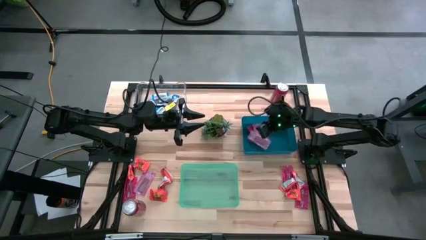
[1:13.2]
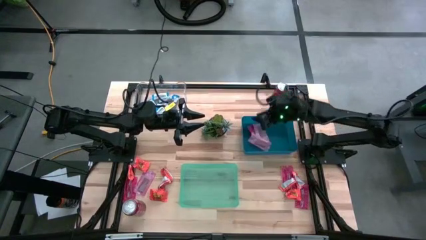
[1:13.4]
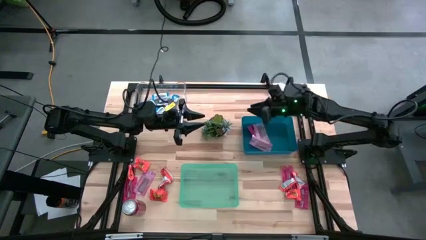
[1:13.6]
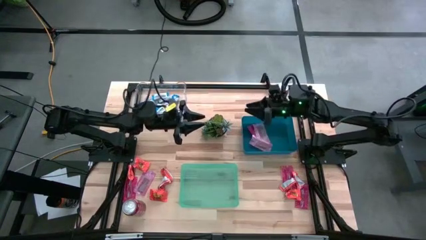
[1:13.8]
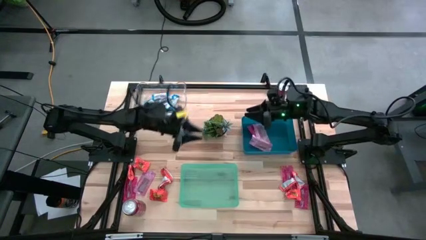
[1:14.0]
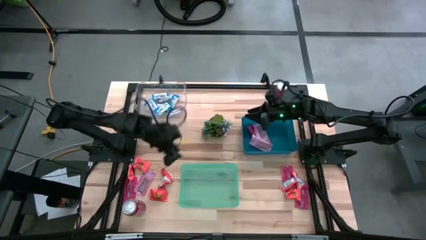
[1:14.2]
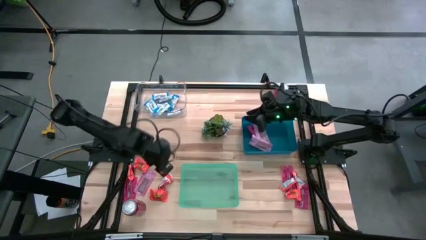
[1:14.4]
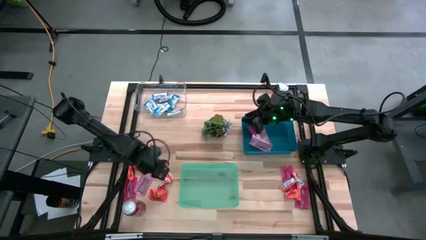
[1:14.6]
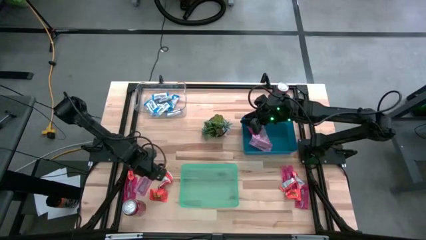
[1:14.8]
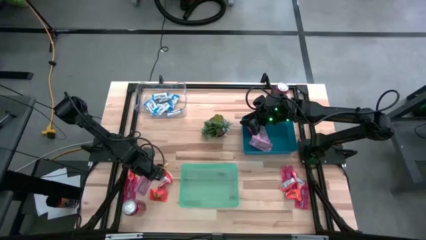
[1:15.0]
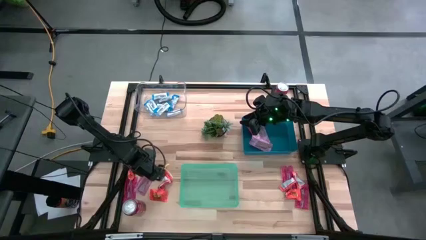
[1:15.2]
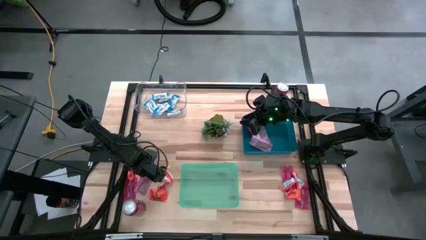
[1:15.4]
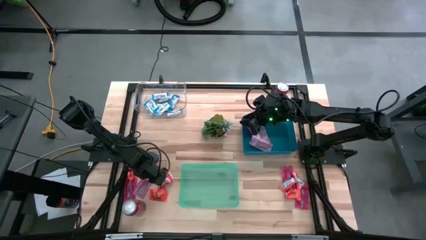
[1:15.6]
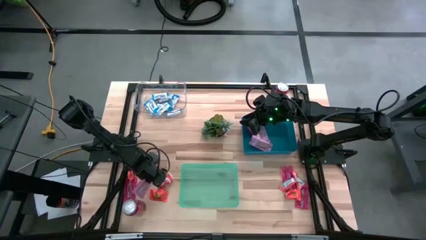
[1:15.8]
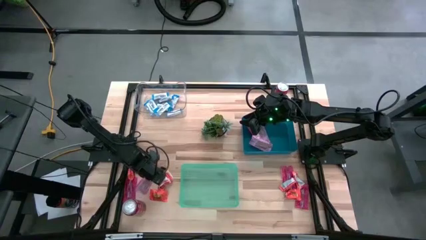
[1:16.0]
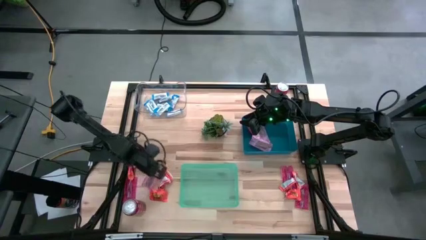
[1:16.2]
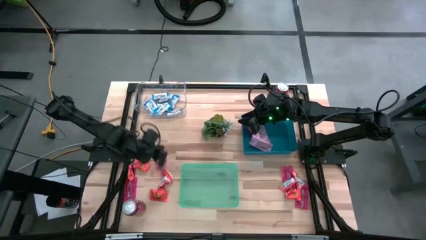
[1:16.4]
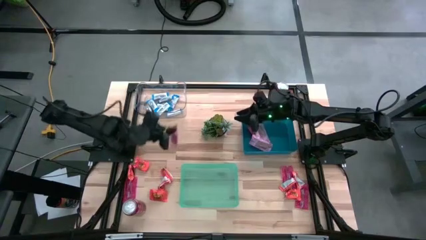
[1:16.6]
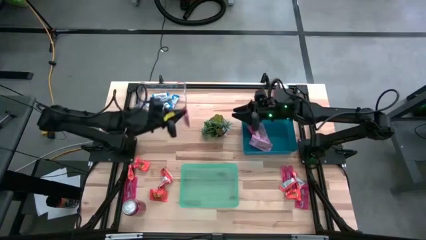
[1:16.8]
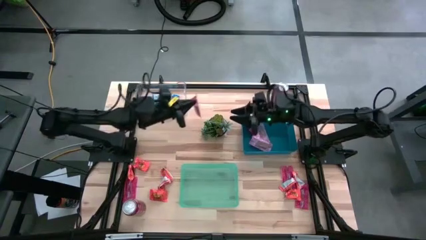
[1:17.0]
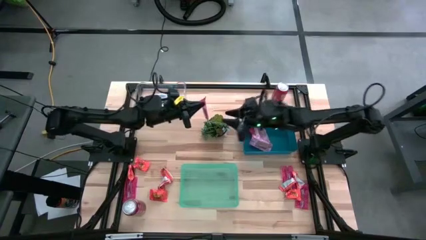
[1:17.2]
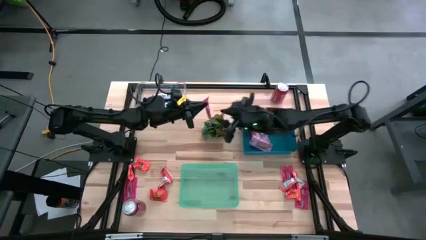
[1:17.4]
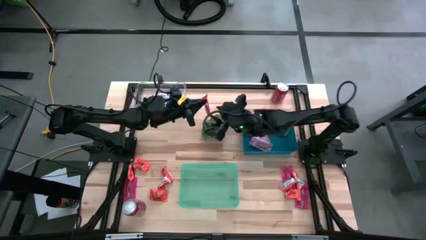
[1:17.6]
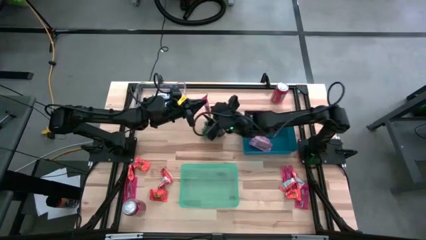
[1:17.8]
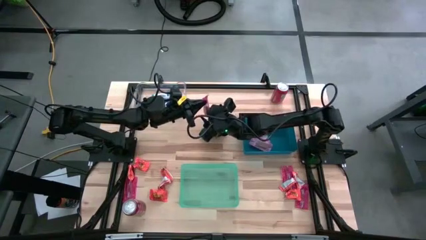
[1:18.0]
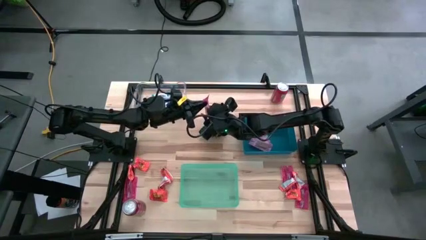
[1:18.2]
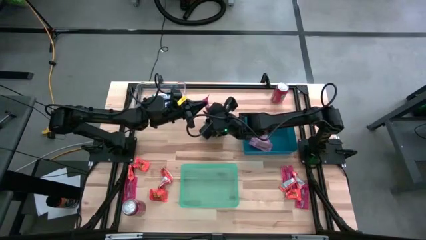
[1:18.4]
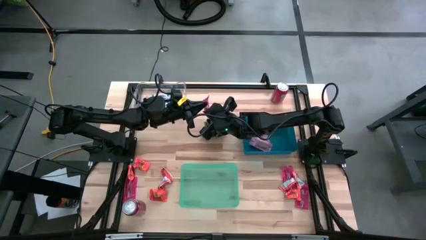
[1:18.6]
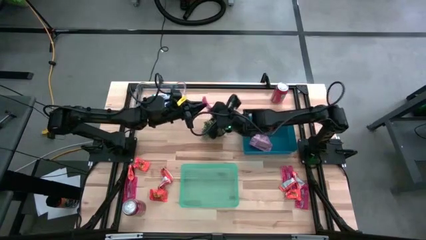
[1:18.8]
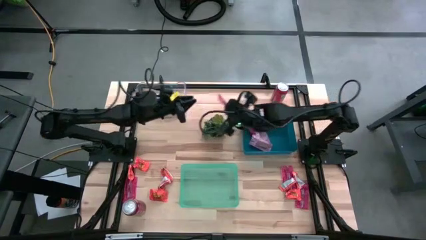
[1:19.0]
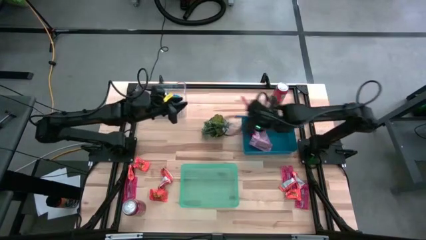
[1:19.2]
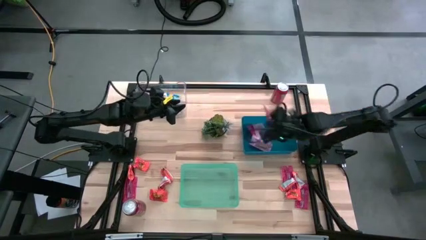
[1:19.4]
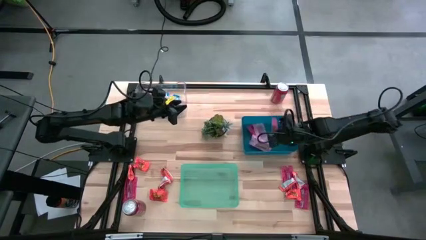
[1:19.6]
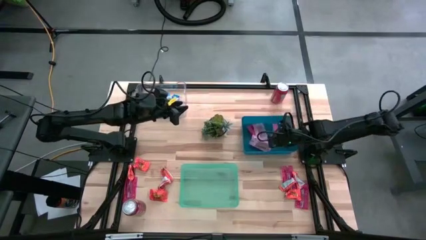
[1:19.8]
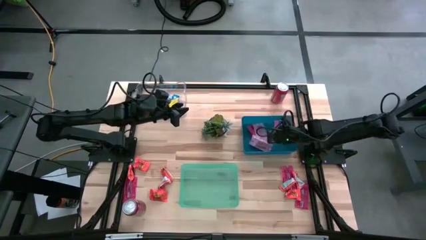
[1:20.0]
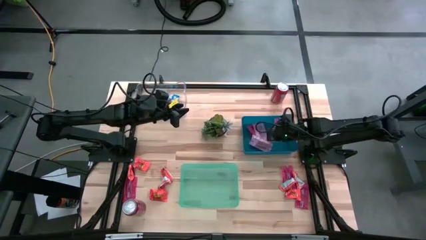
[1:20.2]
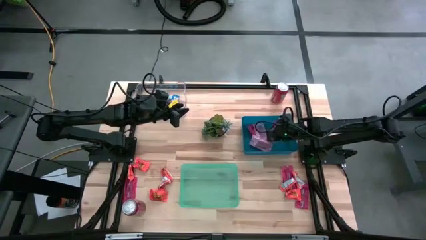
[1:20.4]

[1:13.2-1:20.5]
Task: Sort candy
Put the red candy into the blue bin

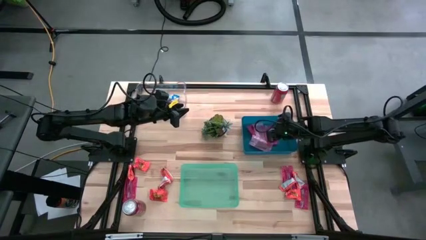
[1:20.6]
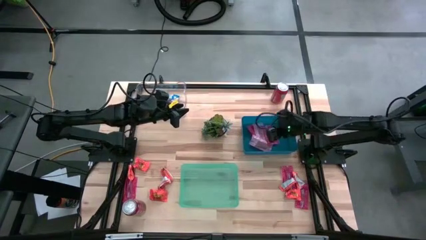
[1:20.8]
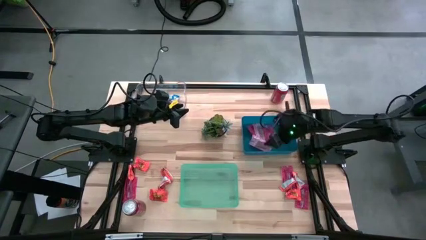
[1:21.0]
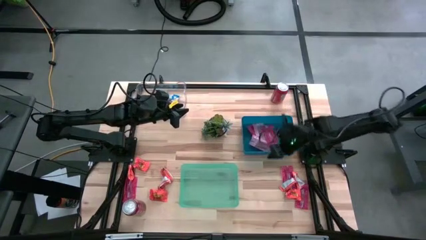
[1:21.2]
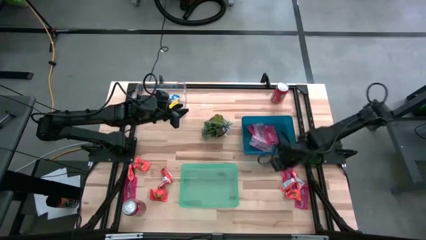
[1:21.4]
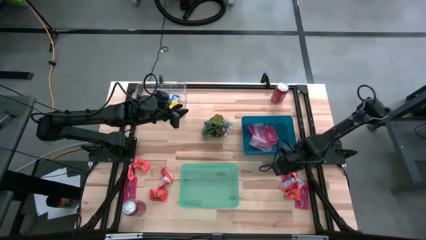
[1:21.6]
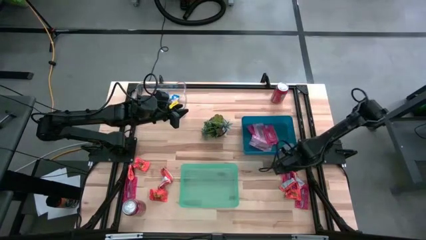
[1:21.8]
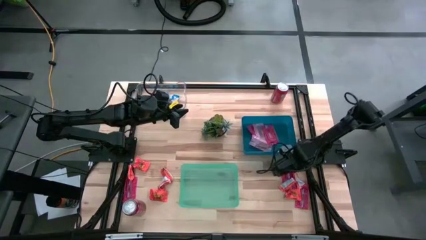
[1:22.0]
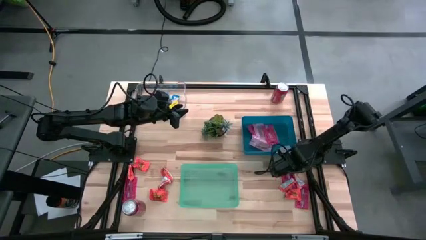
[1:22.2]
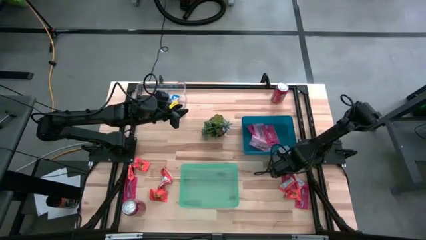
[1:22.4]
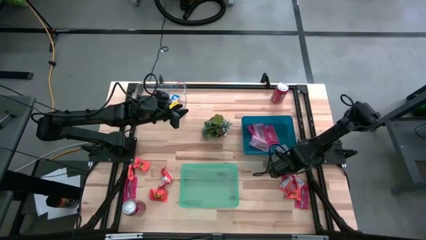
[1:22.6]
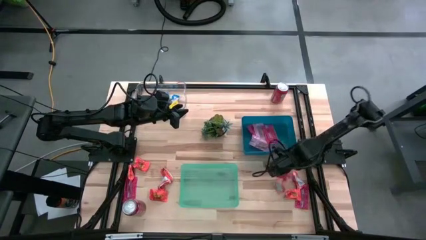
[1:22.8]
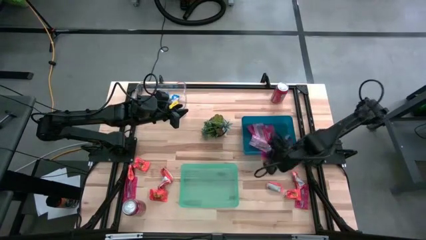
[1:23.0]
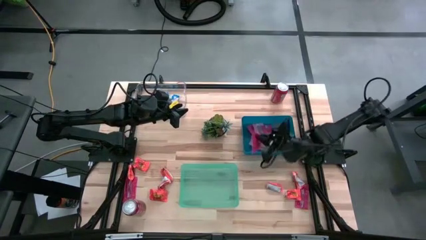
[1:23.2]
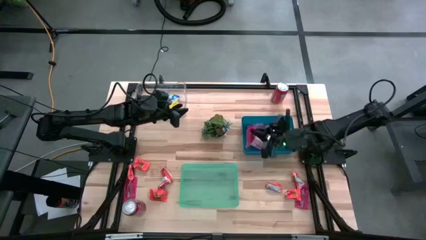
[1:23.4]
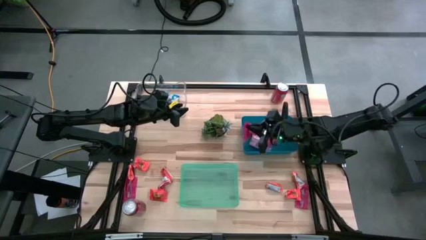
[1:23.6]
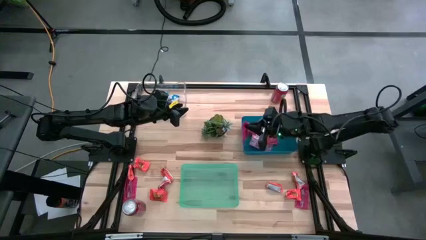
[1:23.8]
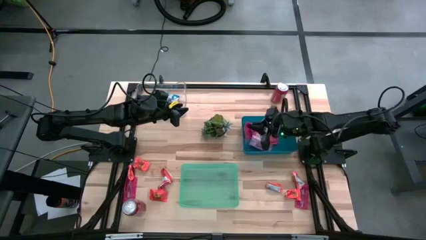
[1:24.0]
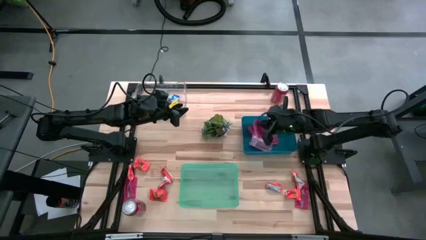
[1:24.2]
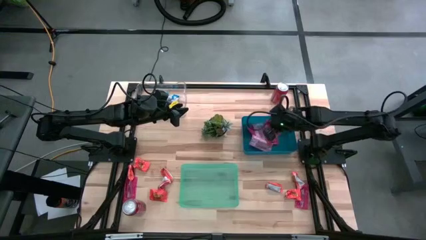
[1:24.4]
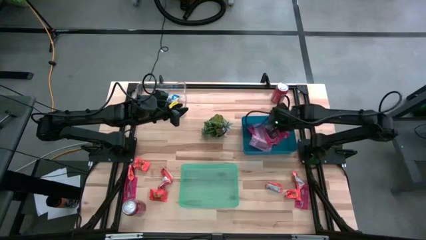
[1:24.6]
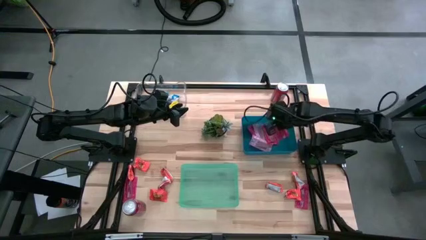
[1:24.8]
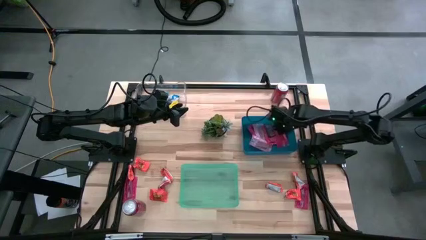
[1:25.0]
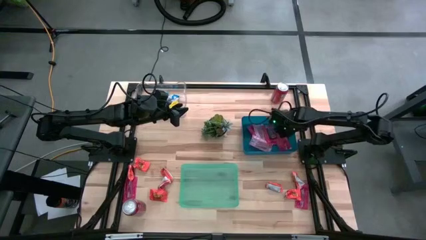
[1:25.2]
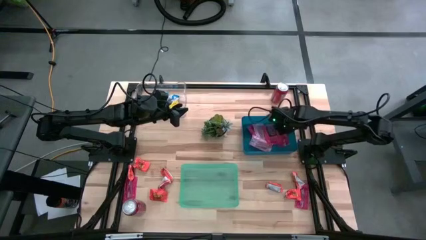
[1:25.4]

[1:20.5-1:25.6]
Put the red candy into the blue bin

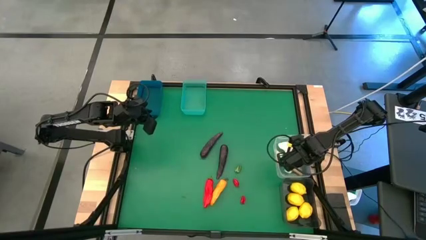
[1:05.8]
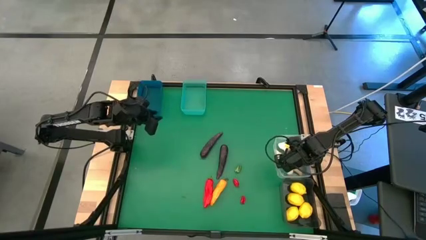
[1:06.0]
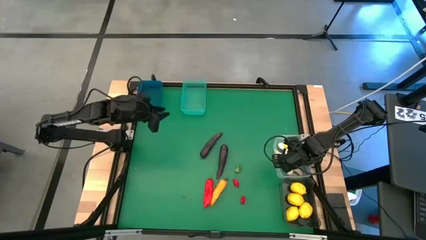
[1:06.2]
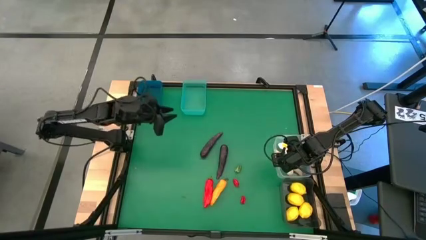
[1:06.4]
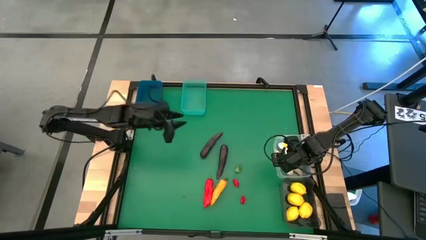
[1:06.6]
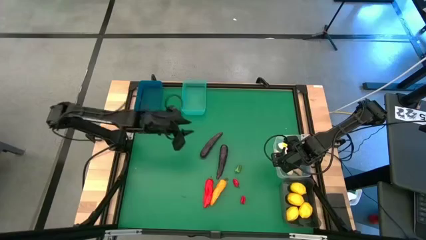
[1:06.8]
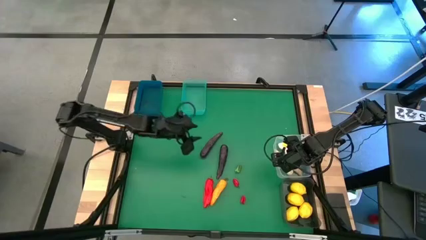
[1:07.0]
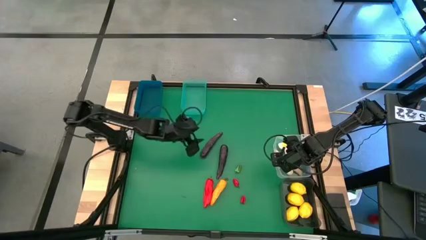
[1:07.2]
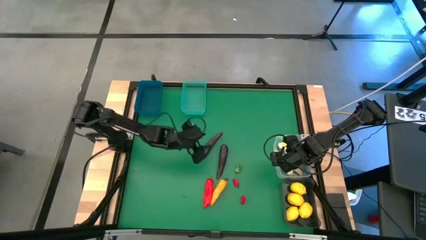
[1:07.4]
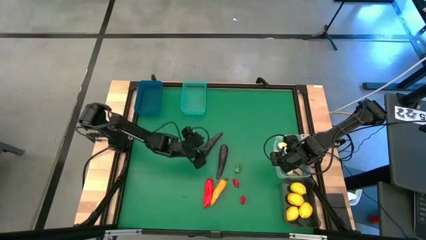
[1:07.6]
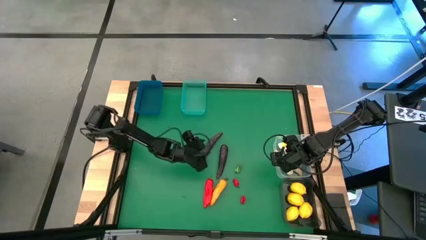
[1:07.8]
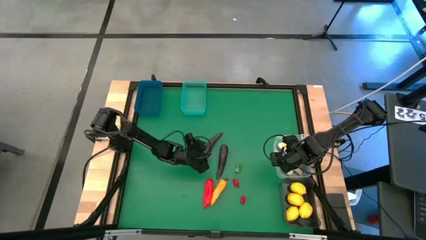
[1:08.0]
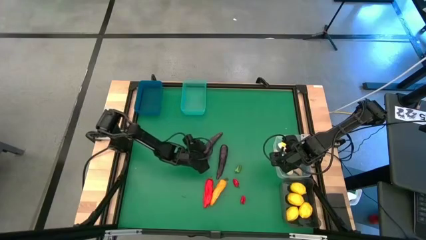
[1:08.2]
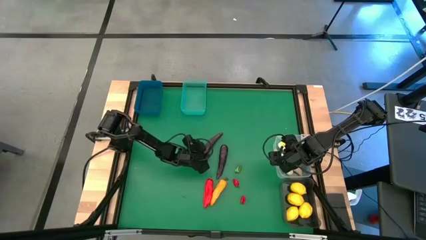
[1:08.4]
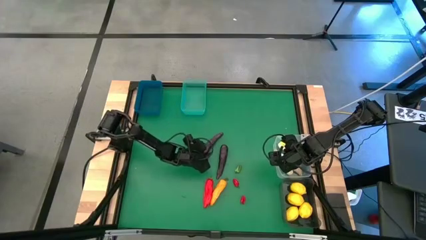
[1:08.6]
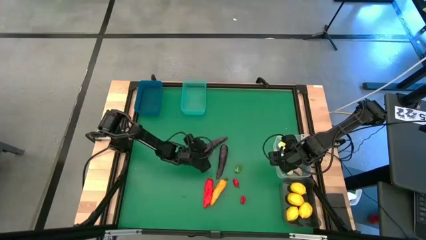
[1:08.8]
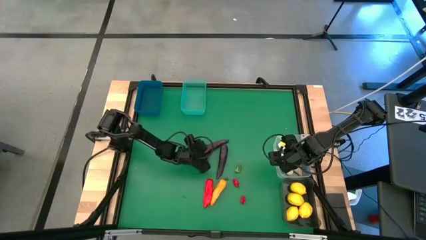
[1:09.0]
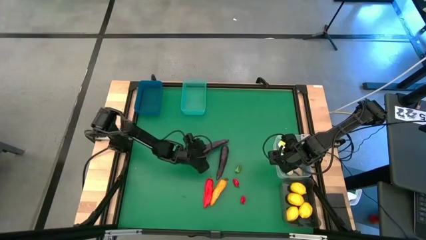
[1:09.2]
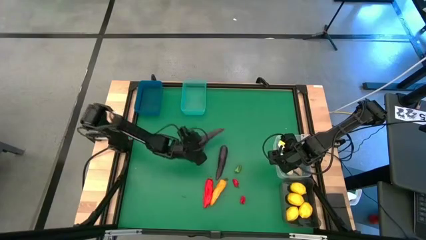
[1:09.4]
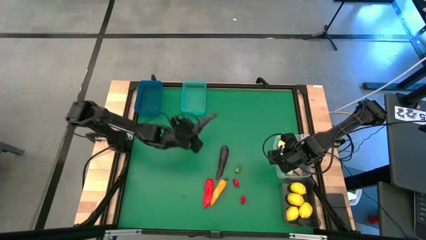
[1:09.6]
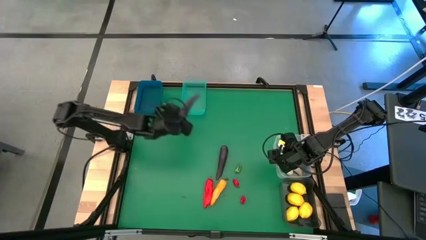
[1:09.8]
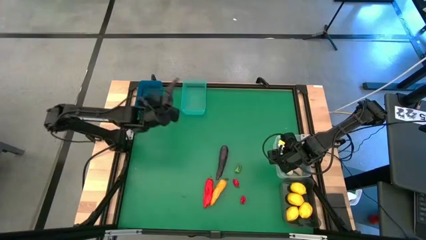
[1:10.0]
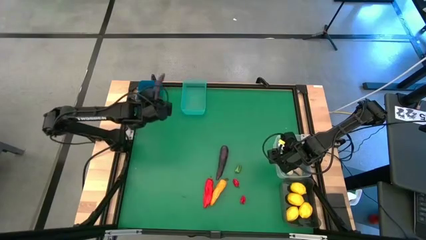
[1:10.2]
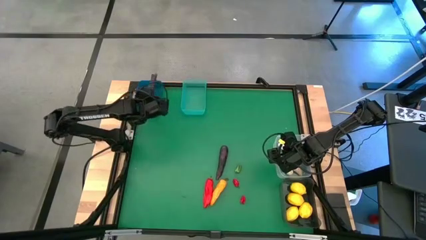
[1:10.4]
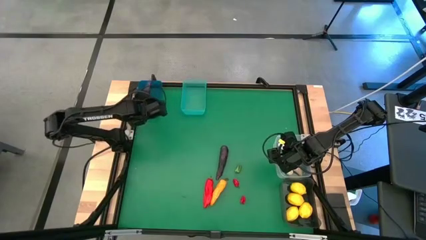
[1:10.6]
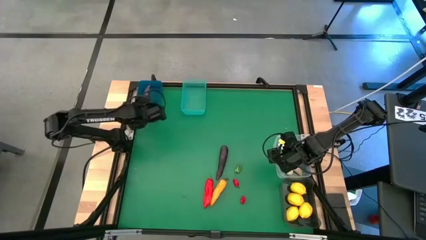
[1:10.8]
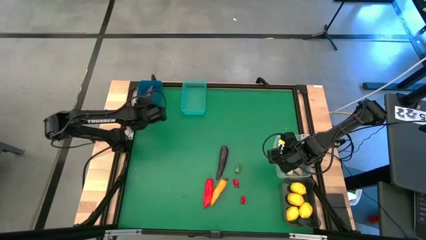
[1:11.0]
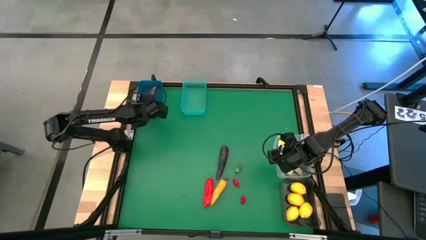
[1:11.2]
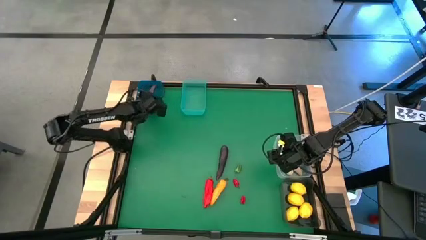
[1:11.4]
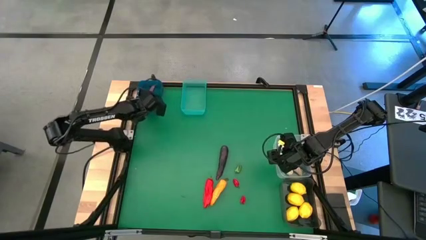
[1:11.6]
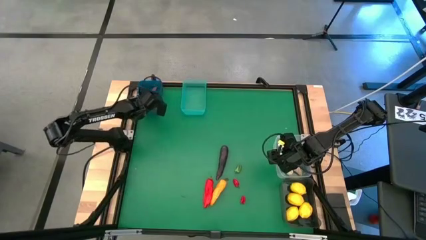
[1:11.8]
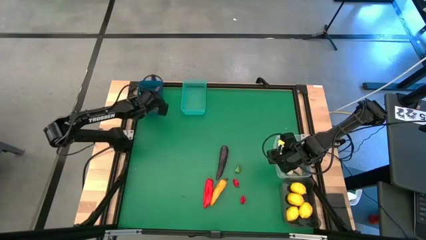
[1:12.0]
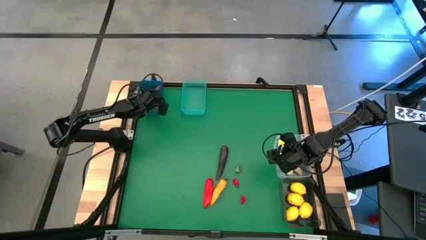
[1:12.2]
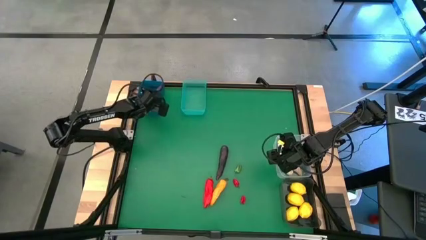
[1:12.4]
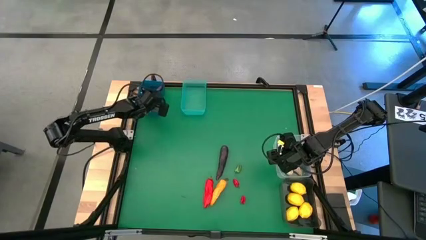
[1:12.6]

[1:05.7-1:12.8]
Task: Sort produce into baskets
Put the purple eggplant into the blue bin
